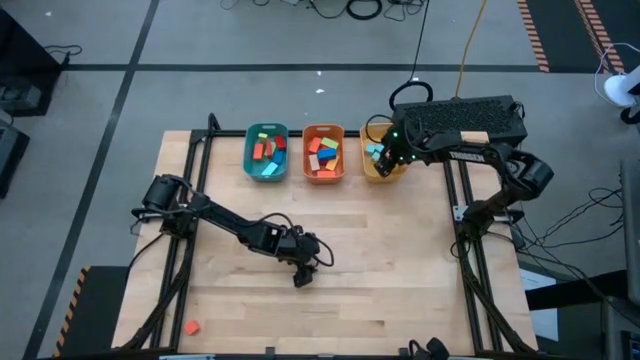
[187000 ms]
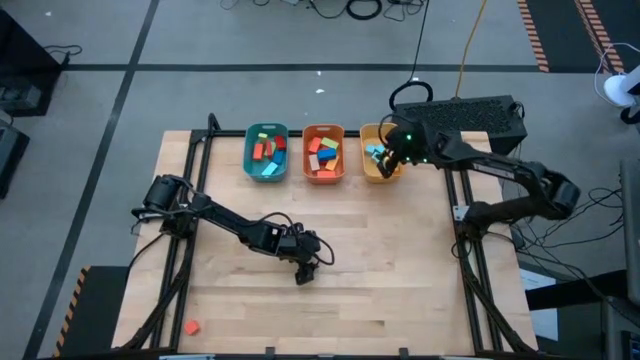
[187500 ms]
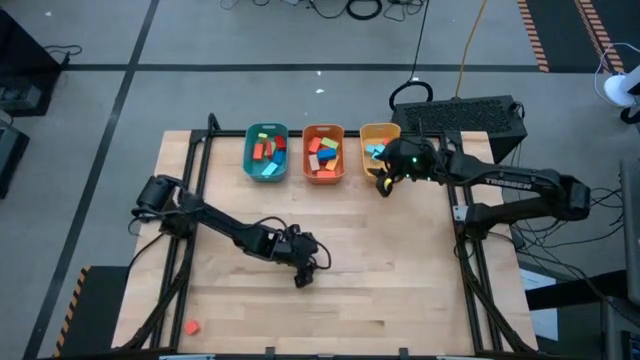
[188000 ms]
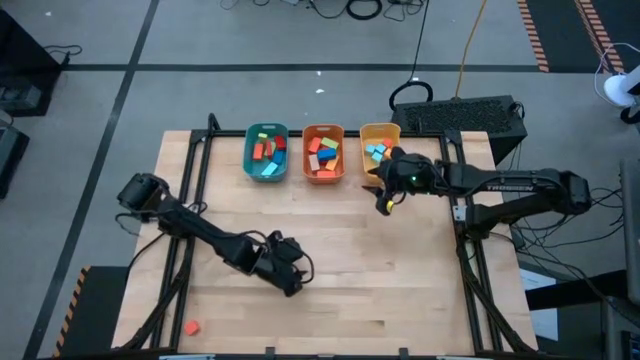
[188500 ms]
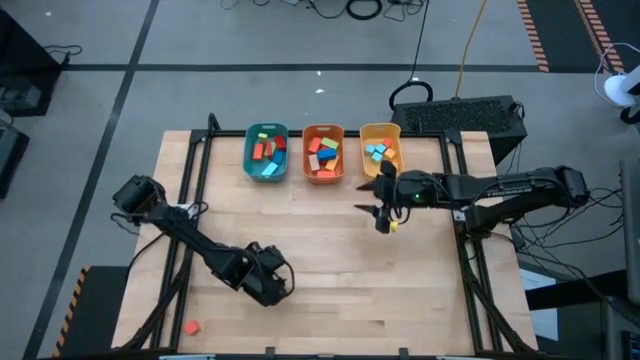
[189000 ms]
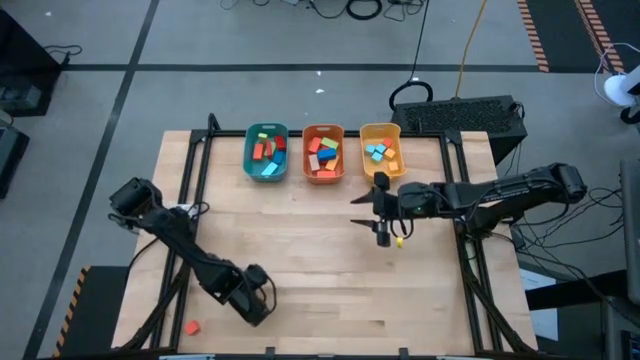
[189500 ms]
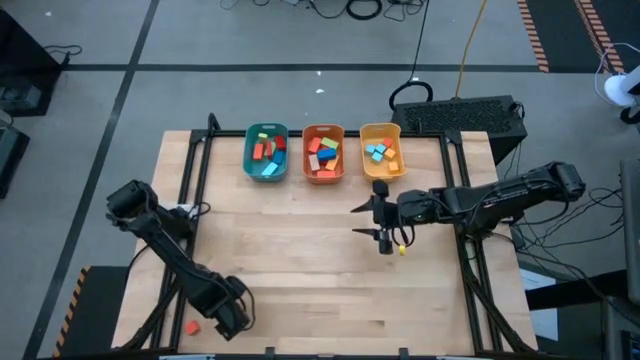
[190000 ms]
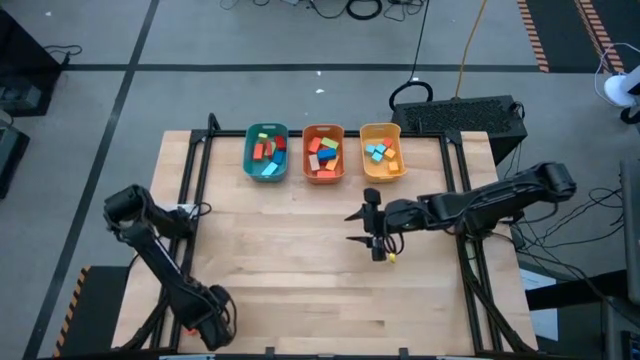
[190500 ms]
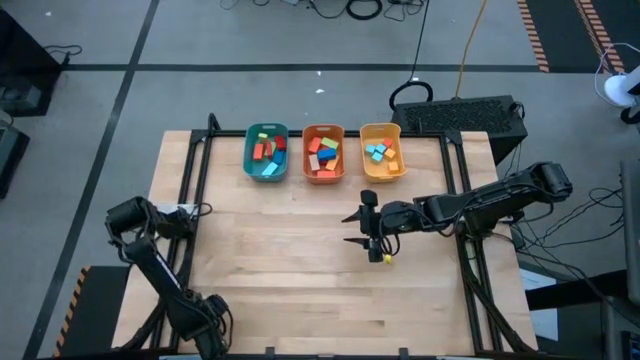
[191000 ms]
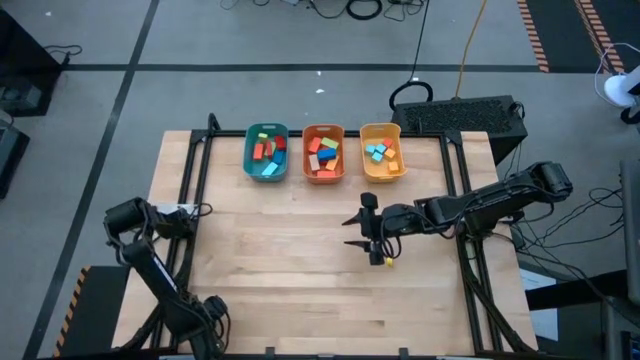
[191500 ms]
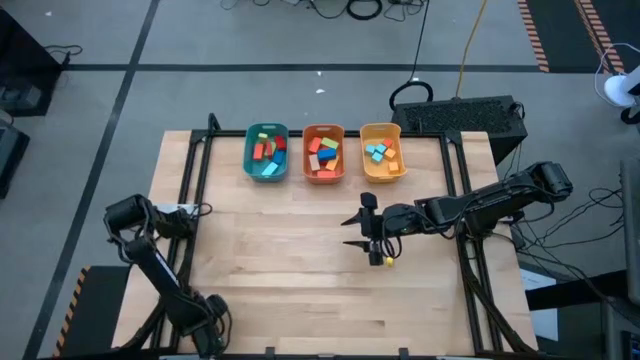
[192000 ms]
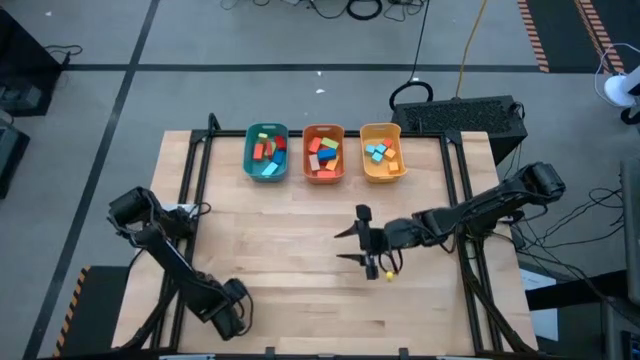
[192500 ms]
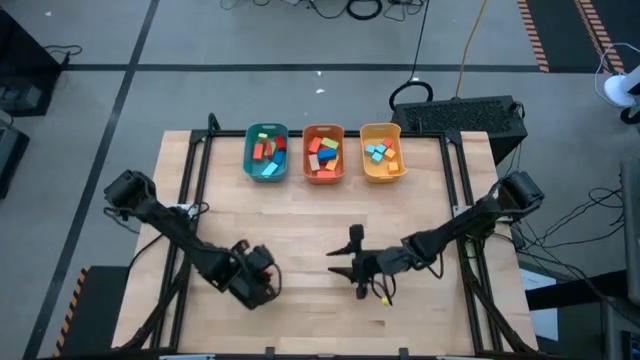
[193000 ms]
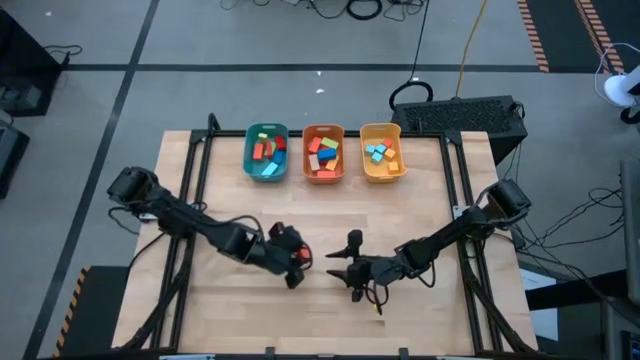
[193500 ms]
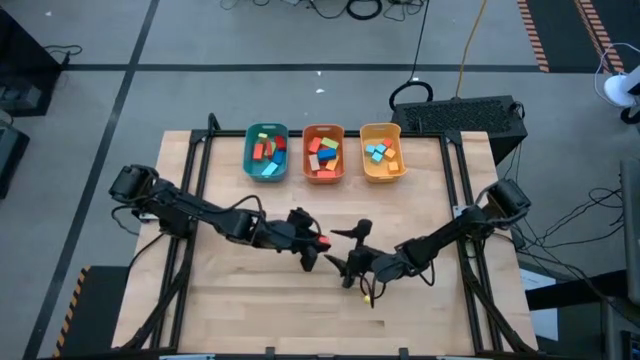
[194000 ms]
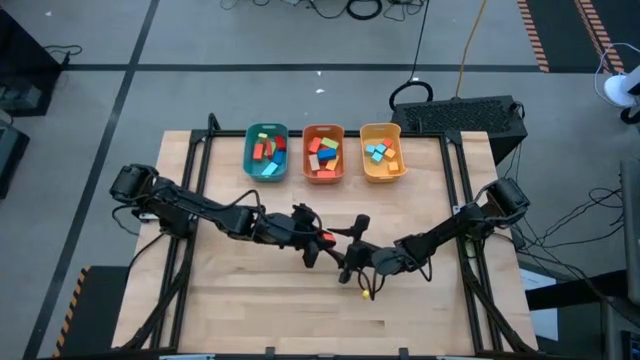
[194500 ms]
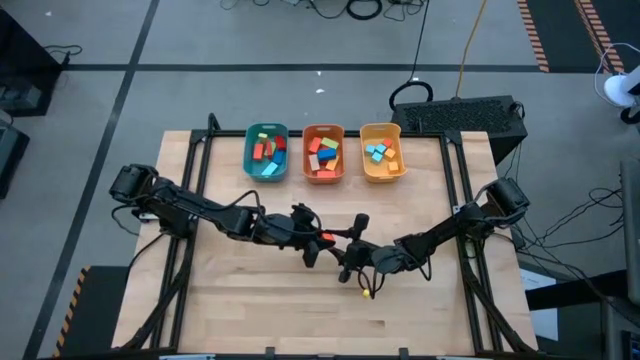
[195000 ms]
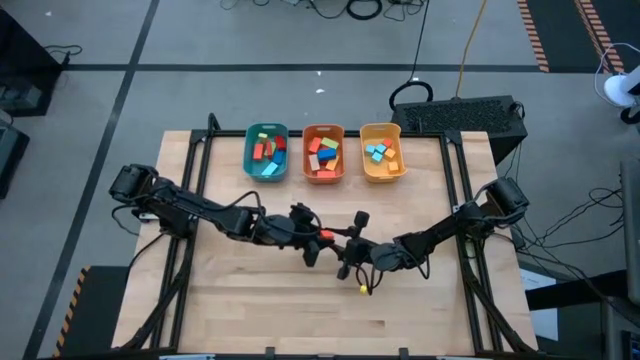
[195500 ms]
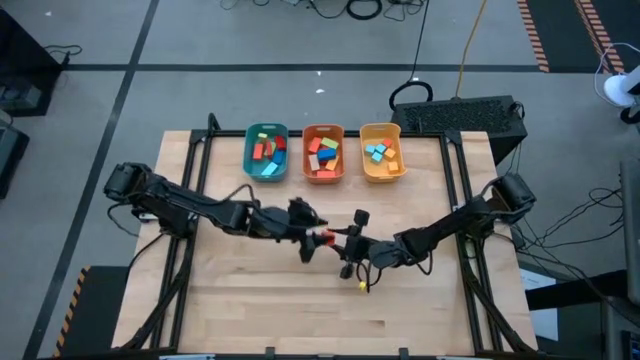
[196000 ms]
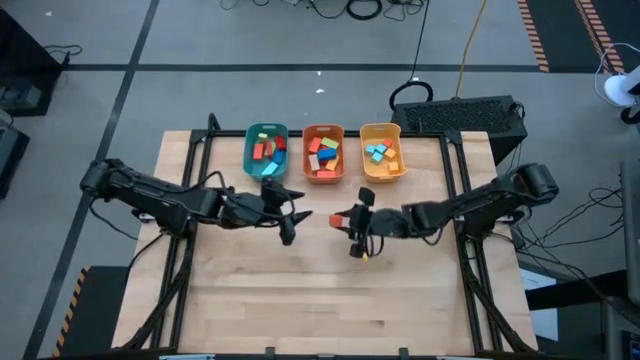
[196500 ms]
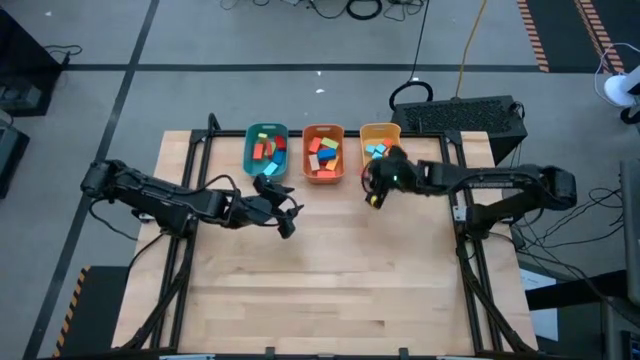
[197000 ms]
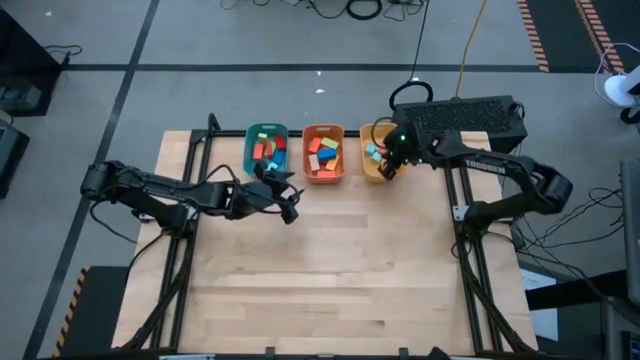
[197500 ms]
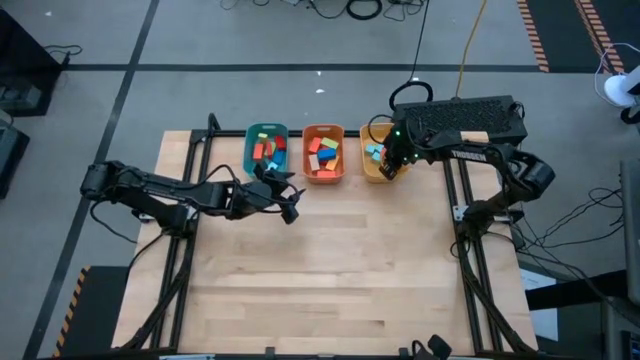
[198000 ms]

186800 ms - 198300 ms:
Task: Sort blocks by size
Put the orange cube block into the yellow bin

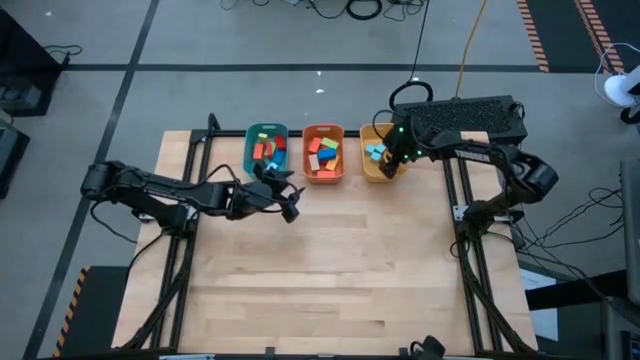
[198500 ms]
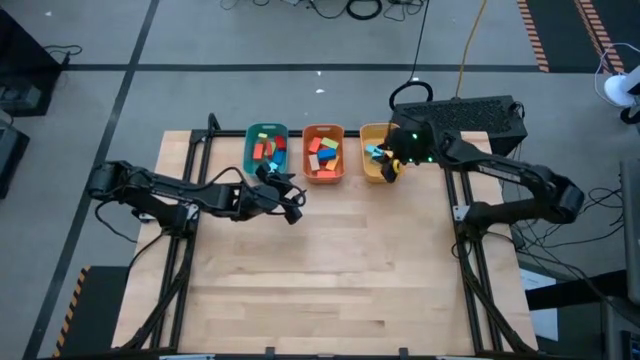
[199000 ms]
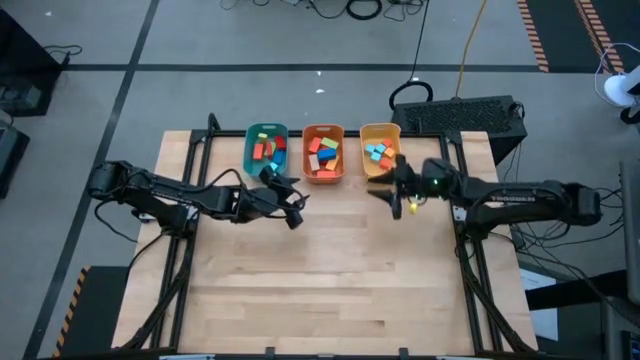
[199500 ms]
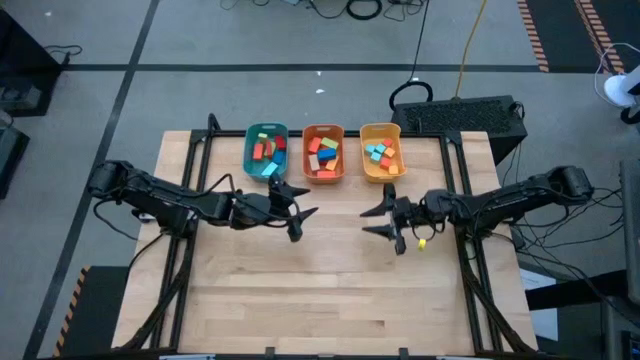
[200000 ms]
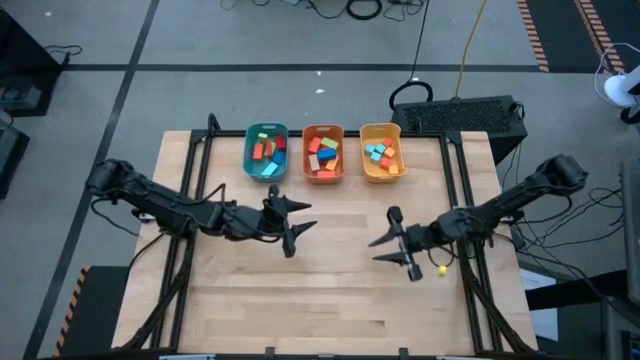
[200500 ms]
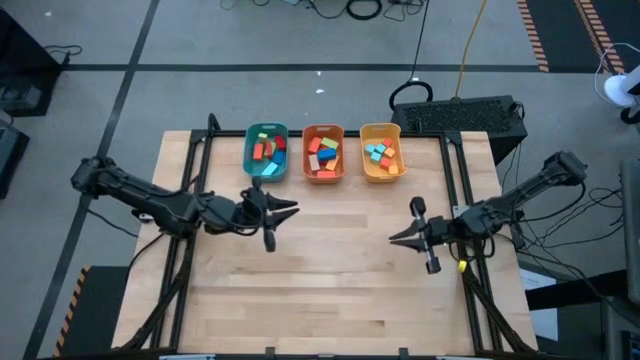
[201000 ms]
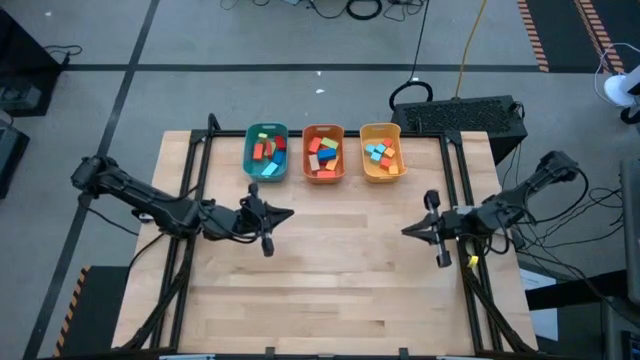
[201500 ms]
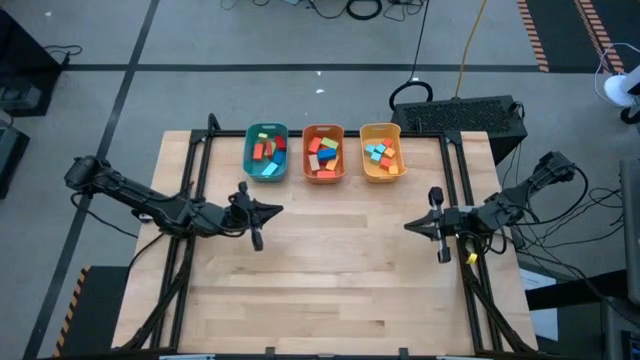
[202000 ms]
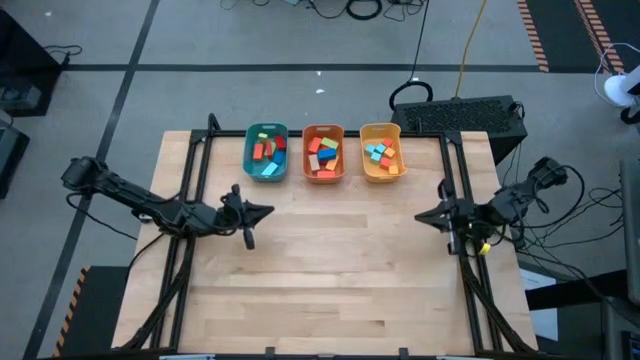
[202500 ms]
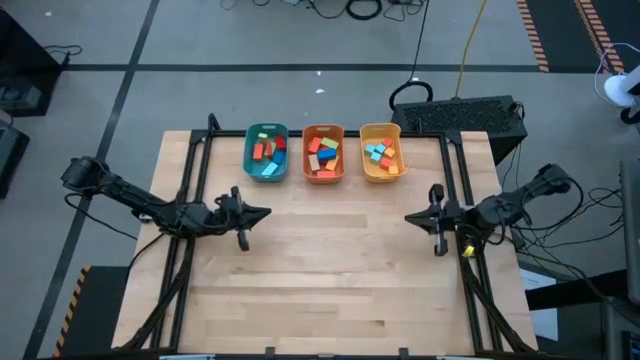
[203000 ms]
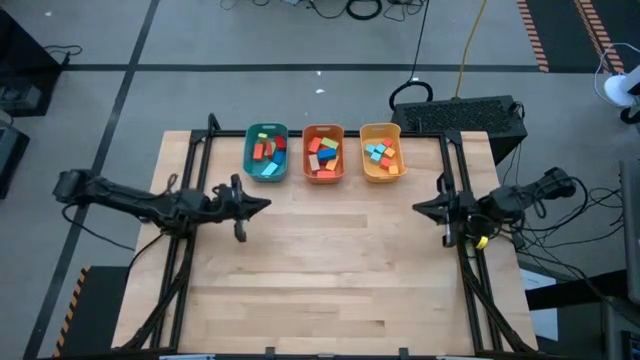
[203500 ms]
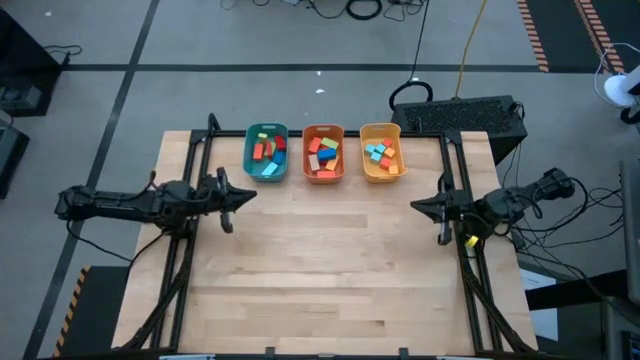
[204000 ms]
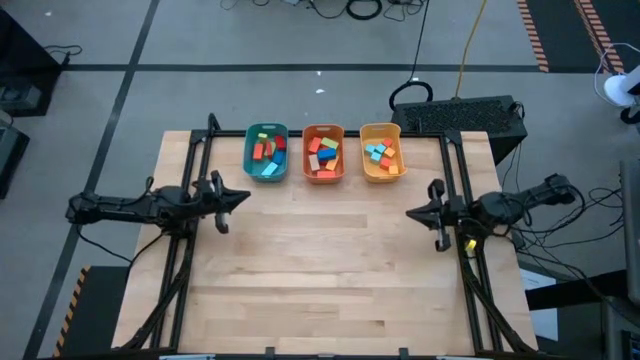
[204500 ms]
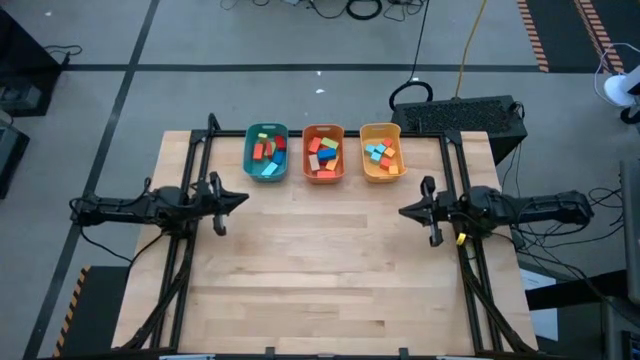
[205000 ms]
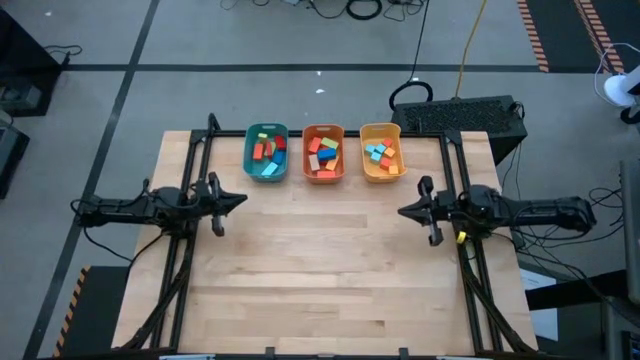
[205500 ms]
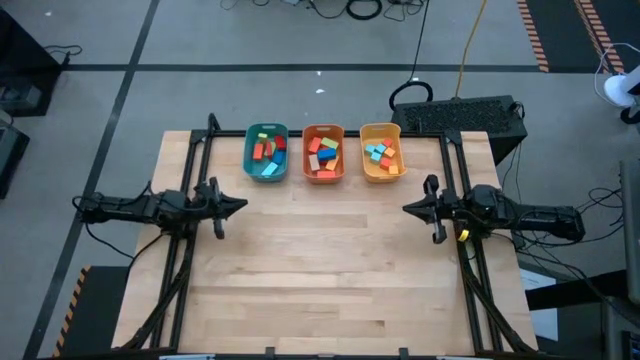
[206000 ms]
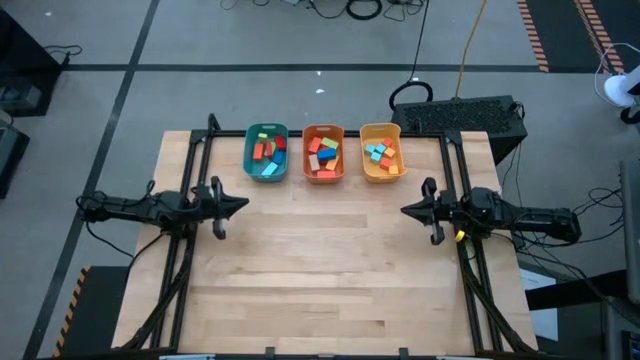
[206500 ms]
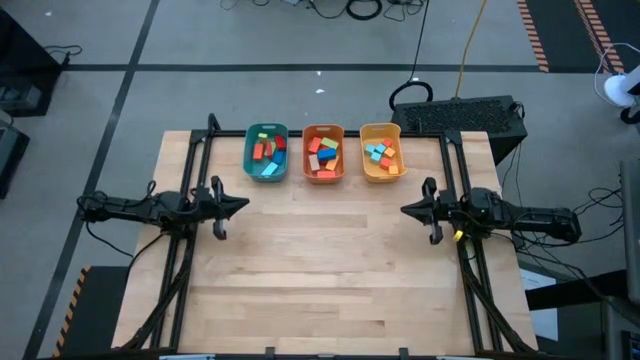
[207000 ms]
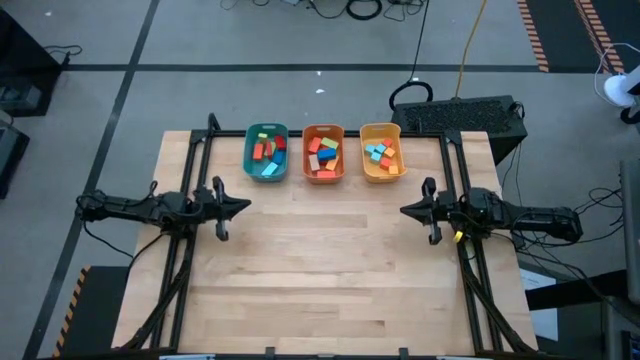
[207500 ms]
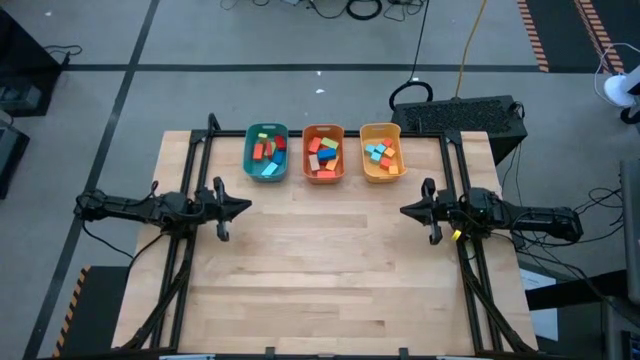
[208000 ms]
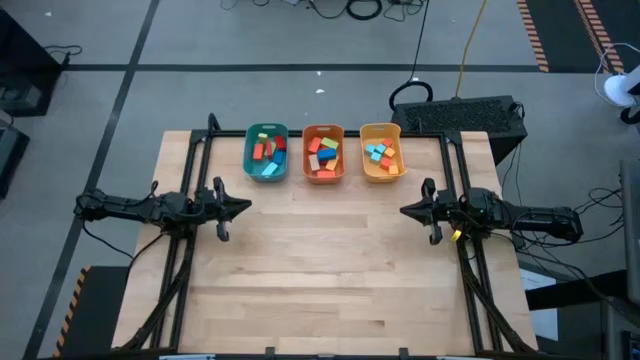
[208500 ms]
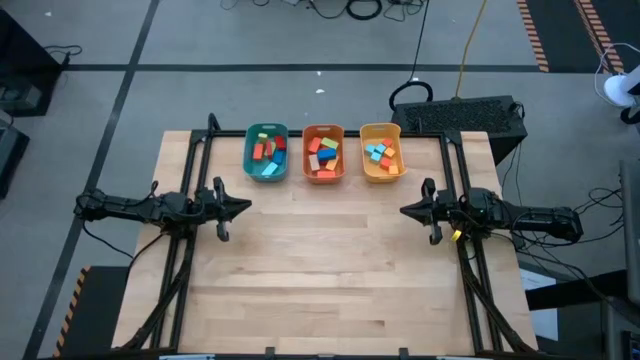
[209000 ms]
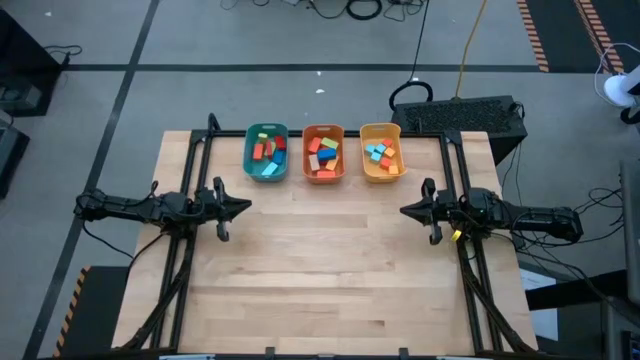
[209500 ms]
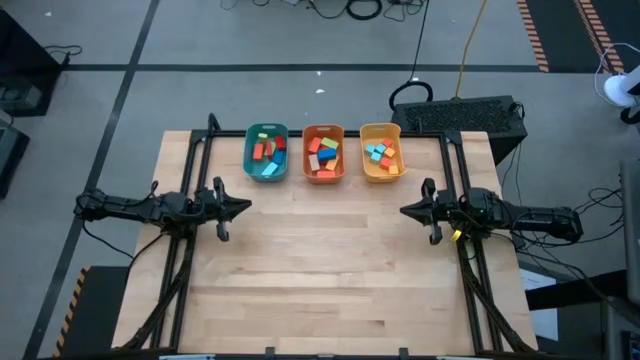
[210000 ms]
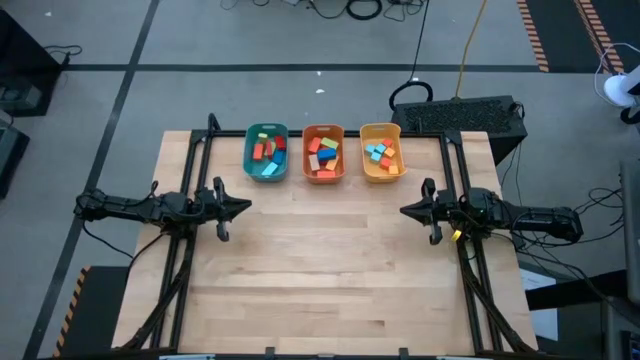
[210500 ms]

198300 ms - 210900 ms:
Return to Home Position
